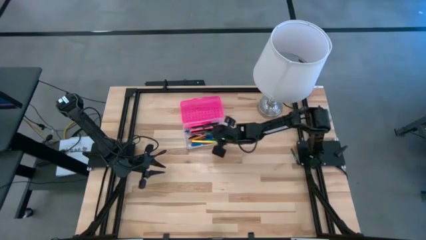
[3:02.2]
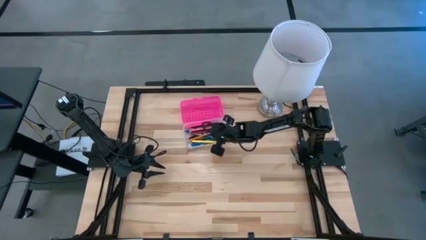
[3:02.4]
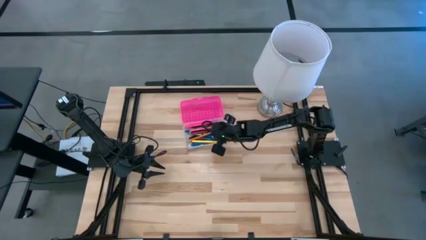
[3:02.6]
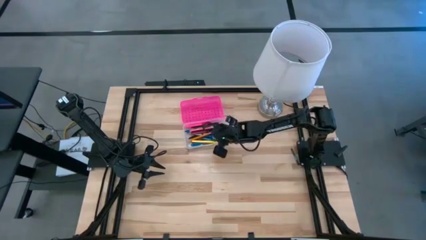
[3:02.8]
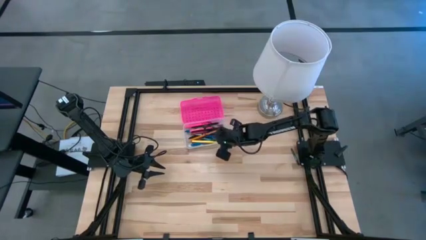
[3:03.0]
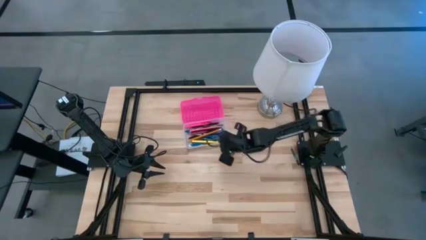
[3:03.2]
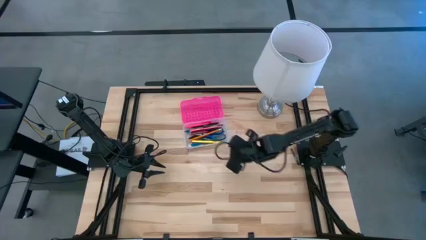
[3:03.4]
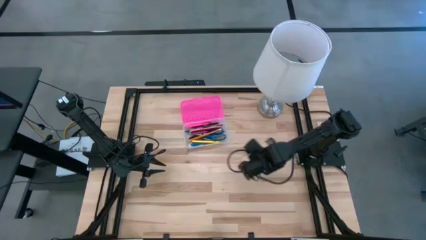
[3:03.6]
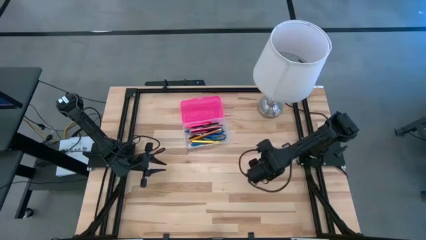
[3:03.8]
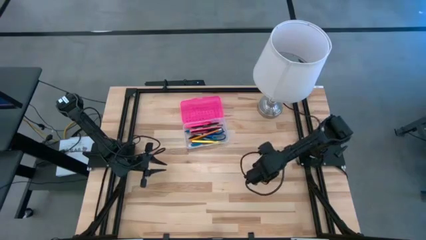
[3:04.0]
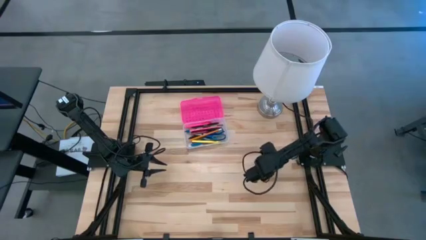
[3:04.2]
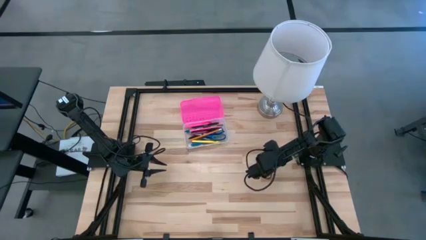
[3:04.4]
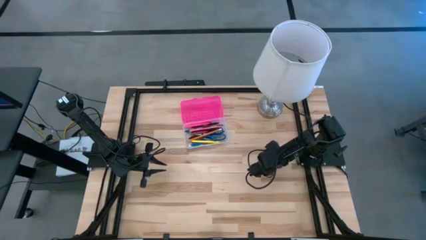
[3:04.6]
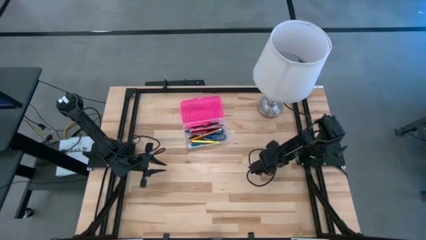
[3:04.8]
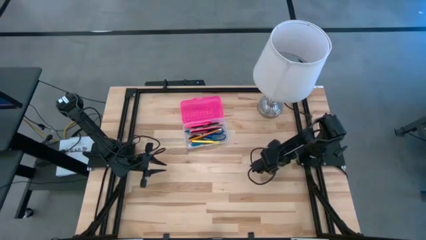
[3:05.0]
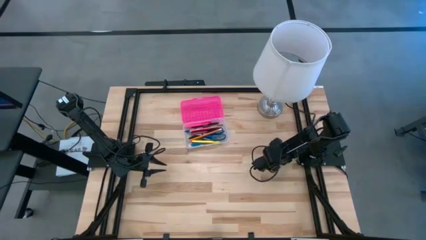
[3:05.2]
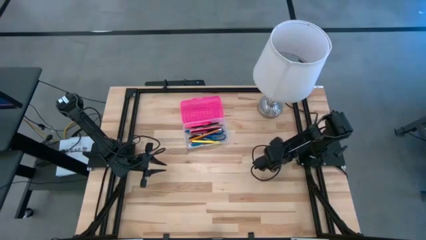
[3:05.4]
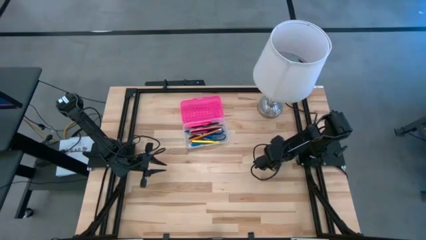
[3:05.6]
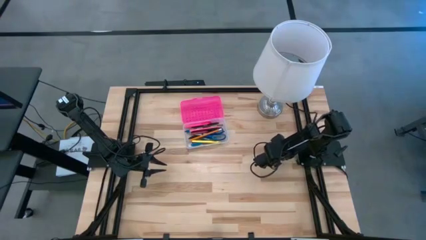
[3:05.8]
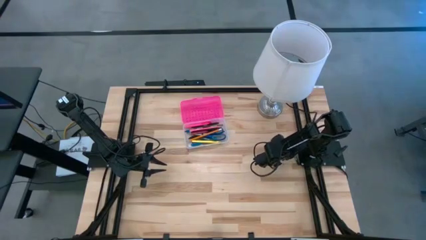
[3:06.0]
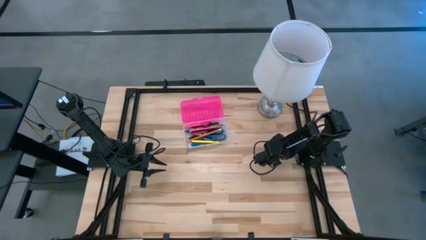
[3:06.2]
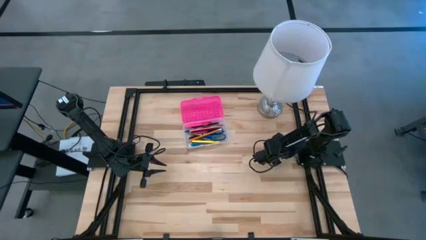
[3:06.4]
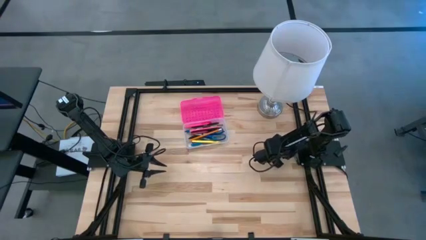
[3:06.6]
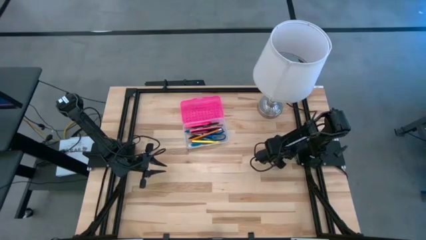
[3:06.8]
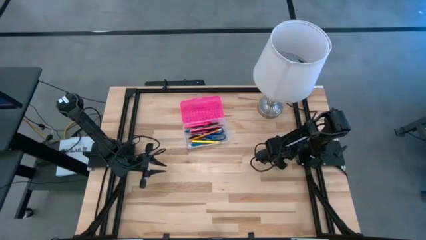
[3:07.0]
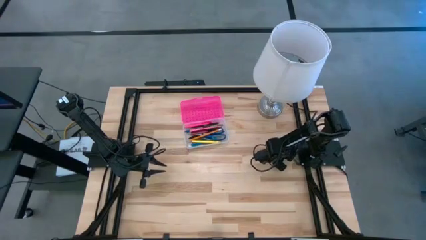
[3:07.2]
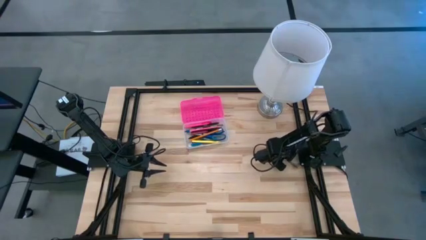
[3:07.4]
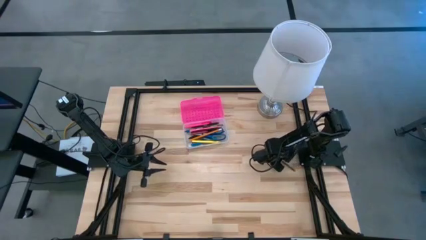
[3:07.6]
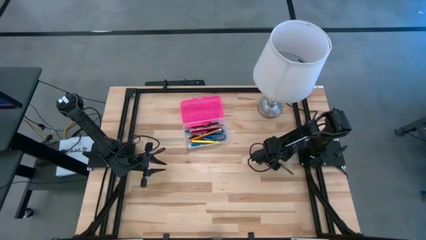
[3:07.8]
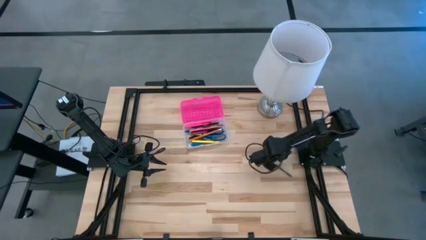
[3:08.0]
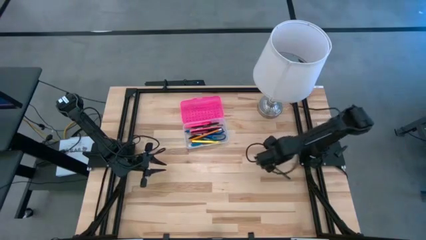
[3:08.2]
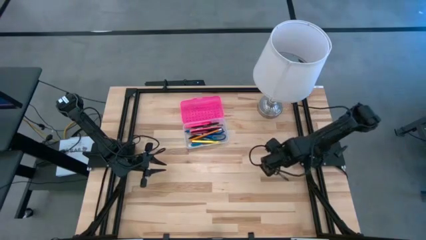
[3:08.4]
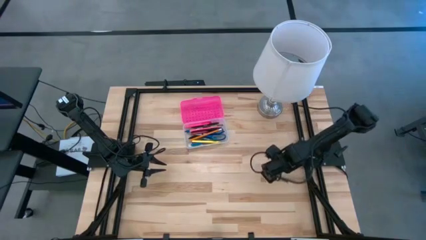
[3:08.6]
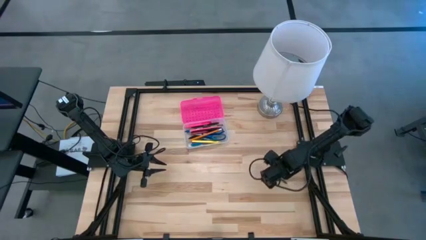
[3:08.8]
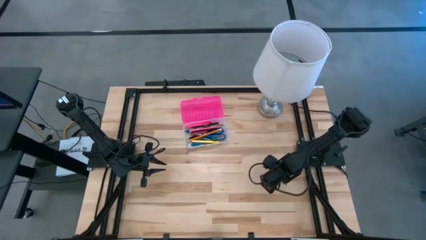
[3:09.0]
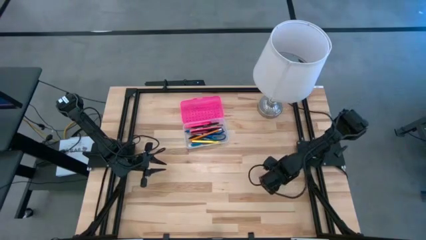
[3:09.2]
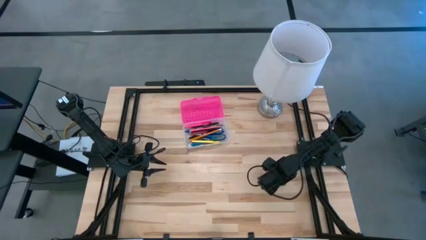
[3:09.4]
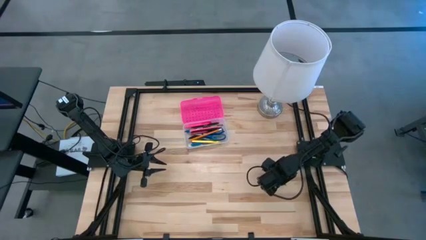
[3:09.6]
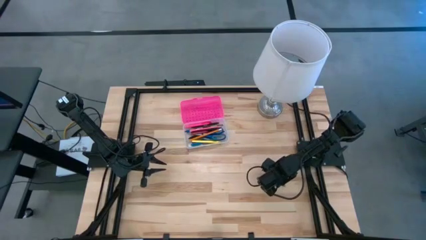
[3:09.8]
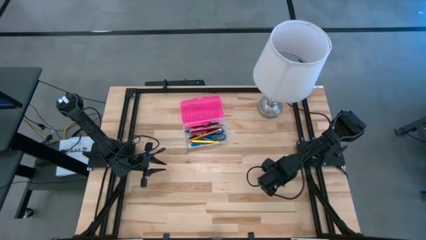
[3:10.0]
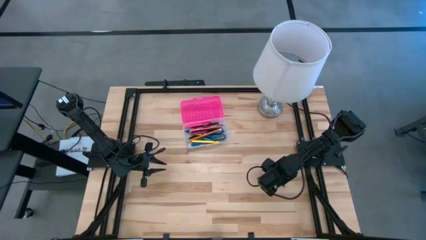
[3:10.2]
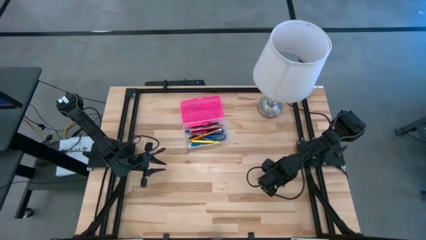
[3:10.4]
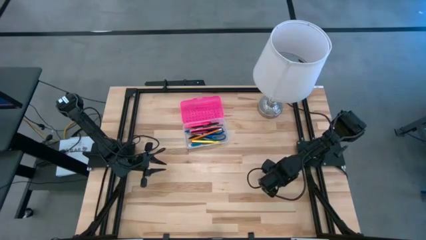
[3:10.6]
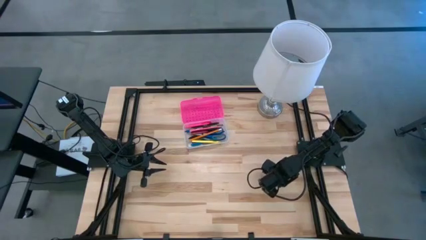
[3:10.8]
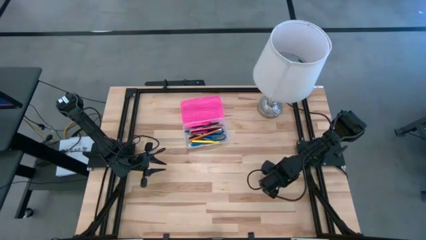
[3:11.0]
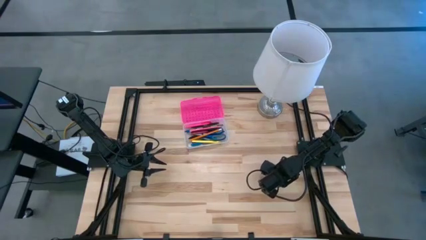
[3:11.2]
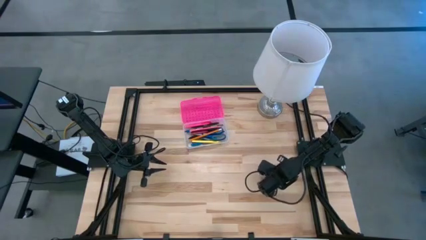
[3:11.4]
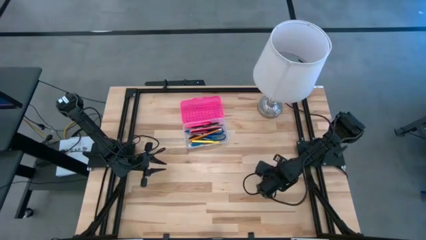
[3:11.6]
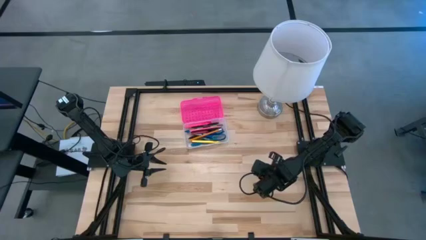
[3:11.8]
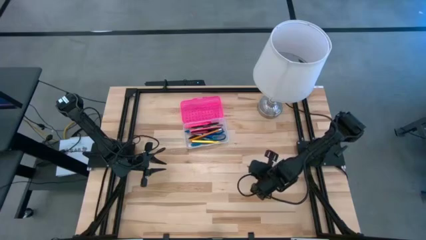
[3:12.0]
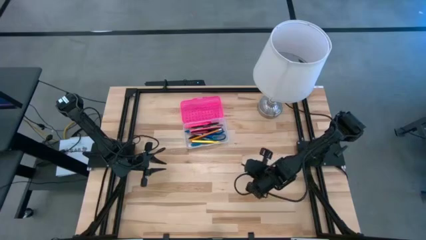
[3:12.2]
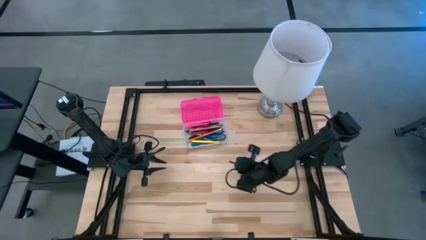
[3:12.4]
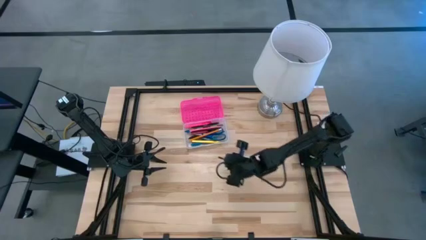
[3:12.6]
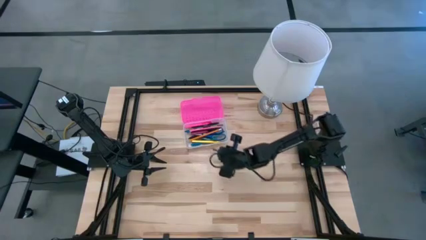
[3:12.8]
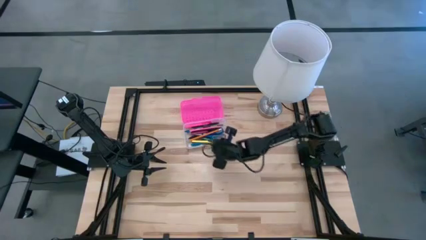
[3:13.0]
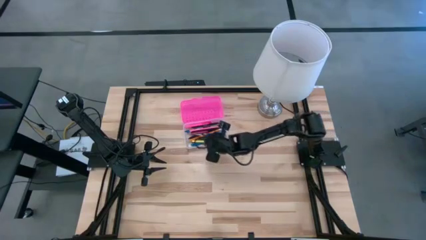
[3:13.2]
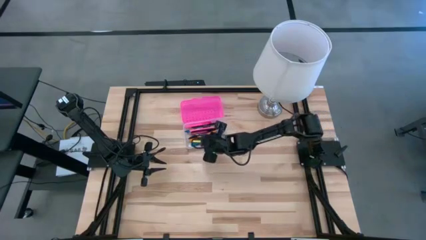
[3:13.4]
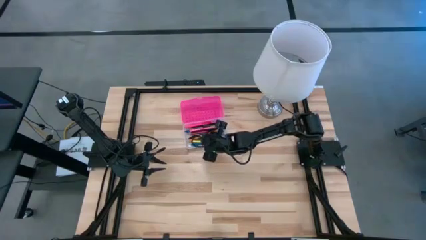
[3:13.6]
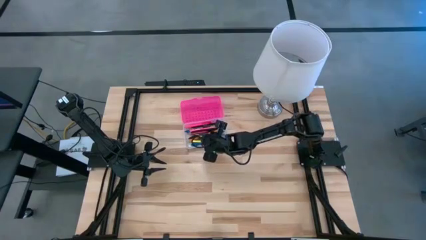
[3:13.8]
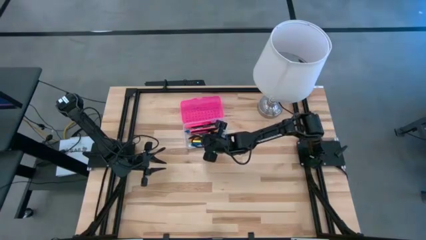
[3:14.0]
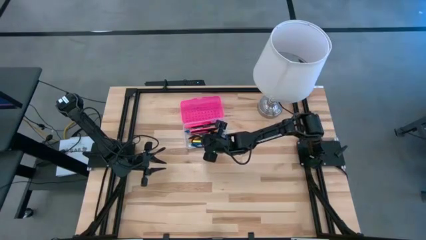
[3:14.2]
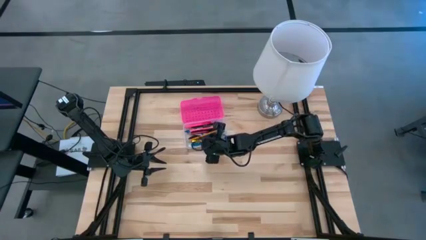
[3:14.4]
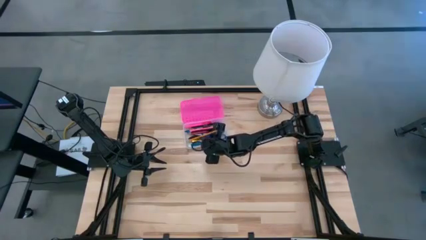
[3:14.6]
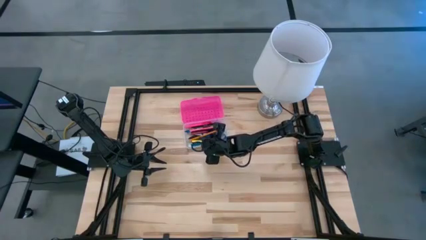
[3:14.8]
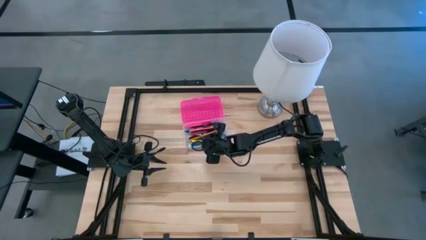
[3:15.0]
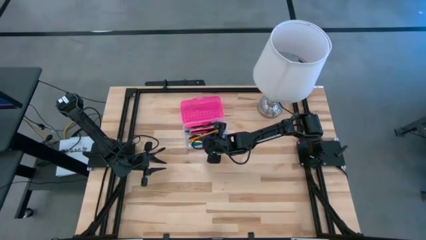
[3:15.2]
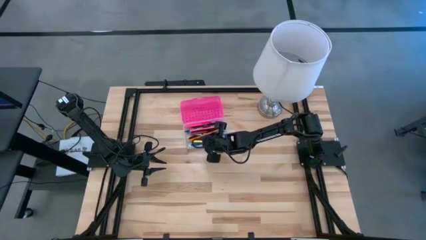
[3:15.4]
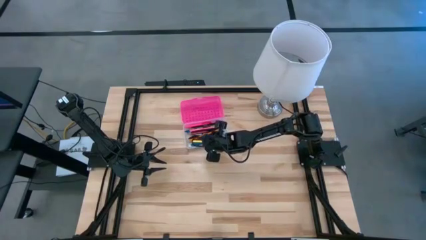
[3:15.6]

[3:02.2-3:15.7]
Task: Pick & place school supplies into a supply box
Put the green crayon into the pink supply box

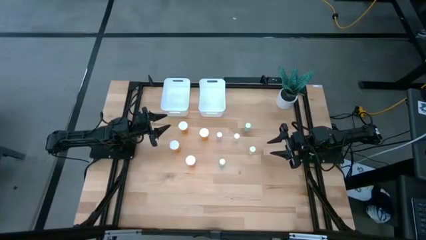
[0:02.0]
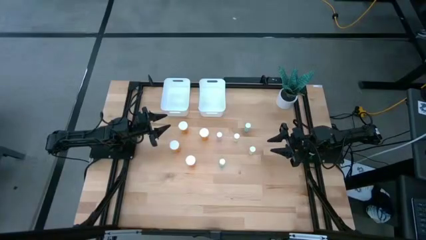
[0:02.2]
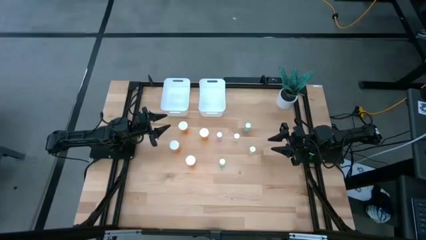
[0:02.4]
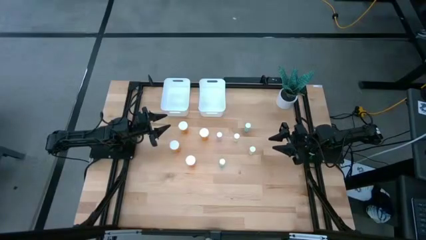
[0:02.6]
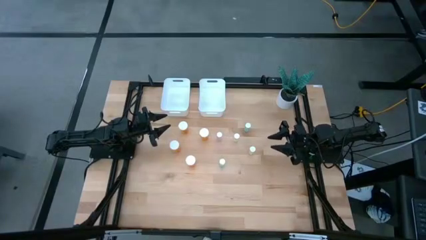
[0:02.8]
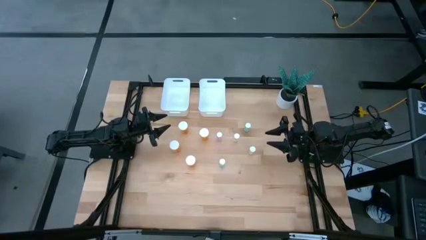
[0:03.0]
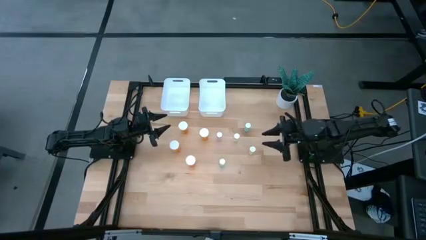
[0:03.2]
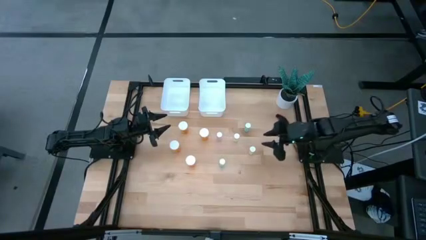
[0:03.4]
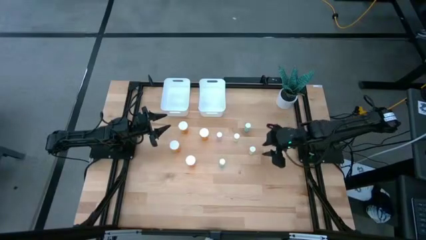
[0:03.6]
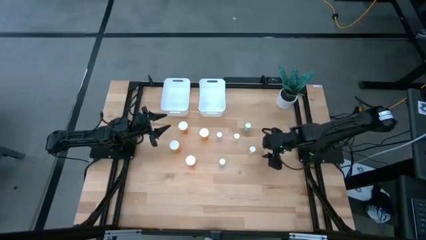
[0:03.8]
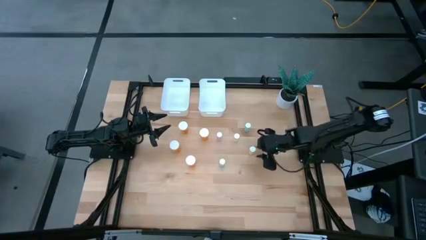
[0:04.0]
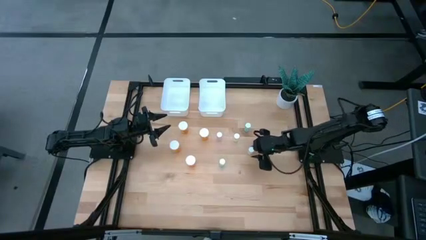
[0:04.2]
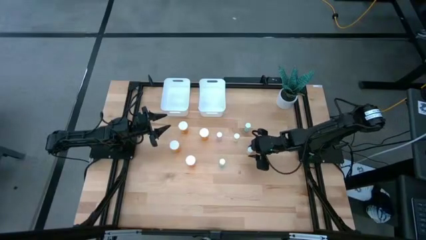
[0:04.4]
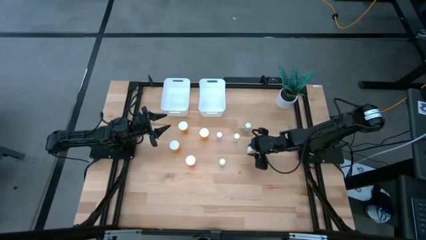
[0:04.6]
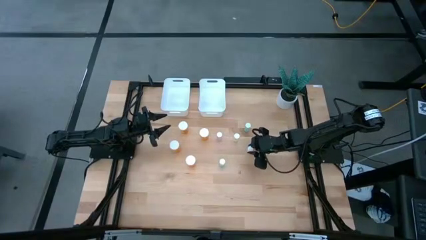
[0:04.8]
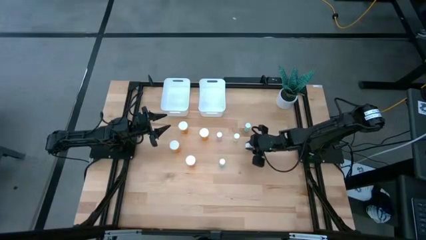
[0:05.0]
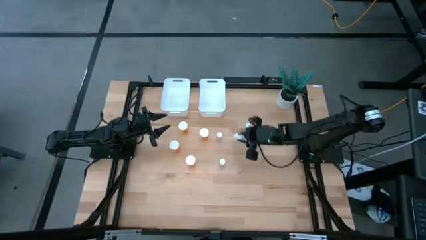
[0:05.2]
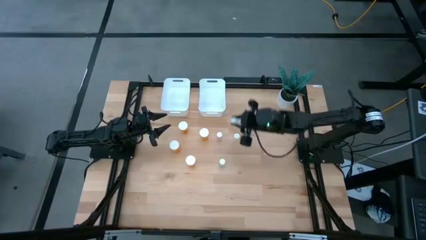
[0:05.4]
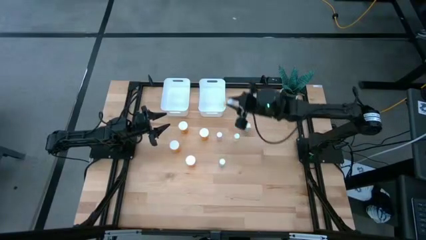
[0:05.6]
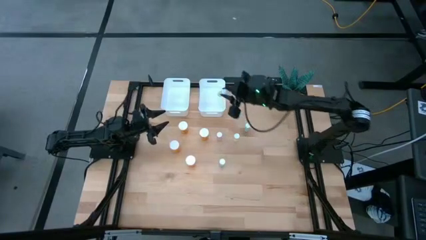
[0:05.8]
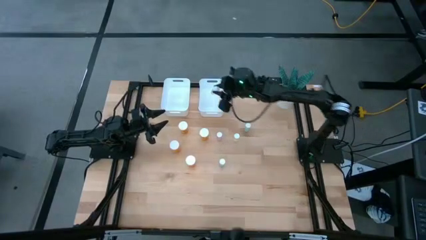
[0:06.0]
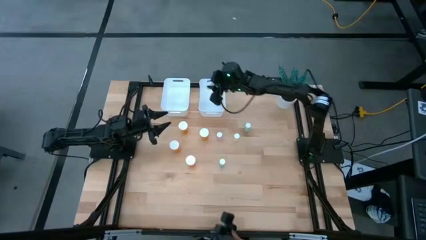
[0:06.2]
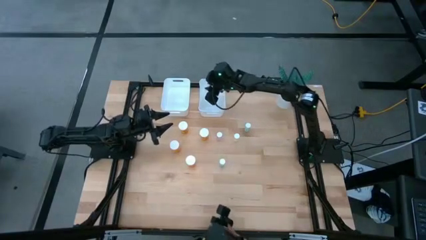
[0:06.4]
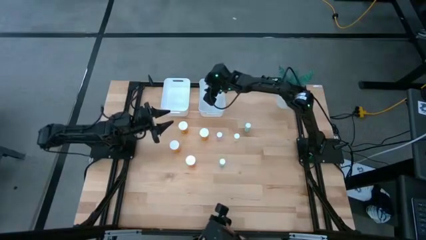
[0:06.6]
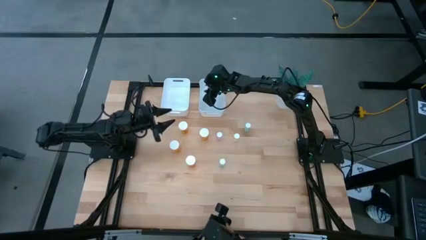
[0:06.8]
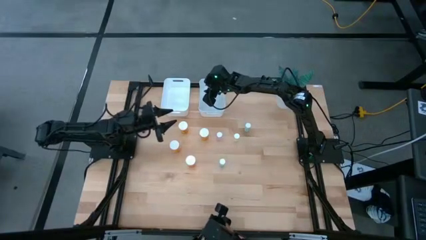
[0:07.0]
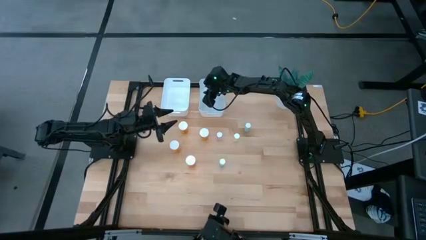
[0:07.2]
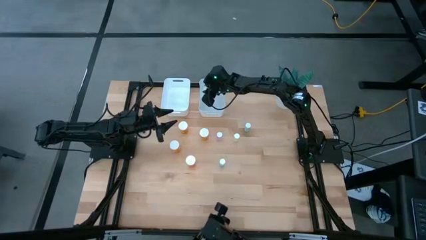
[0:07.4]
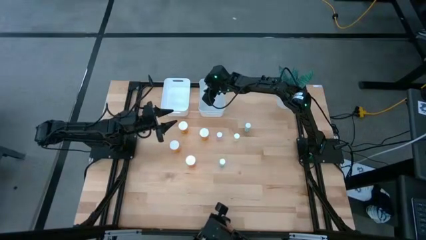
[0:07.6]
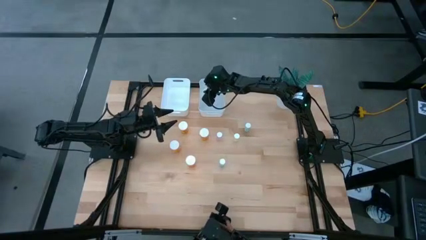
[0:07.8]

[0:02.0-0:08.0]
Task: Pick and place medicine bottles into bin by pill shape (circle, oval)
Put the small yellow pill bottle into the right white bin
